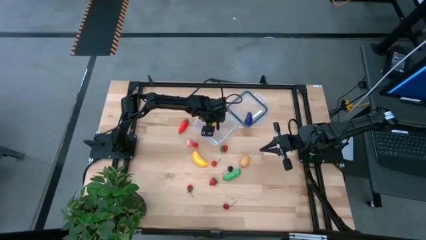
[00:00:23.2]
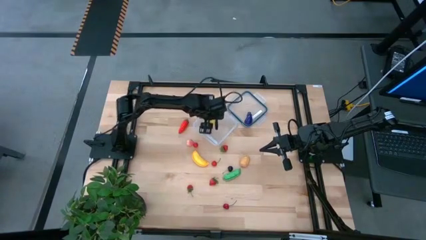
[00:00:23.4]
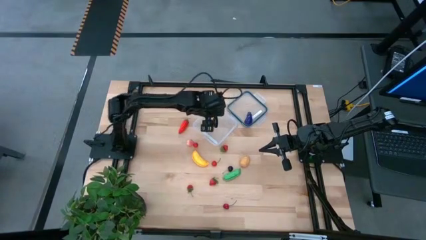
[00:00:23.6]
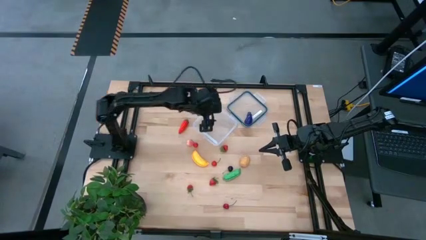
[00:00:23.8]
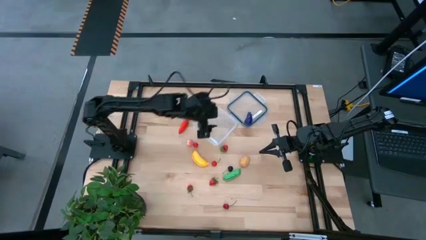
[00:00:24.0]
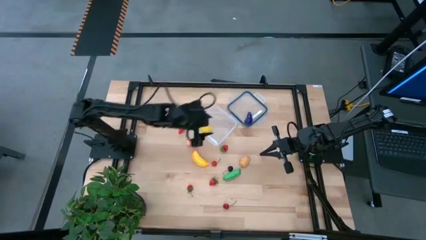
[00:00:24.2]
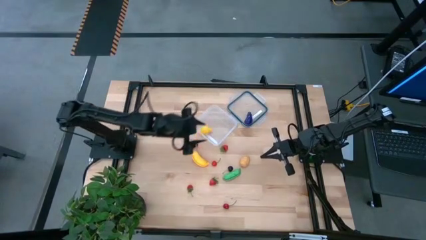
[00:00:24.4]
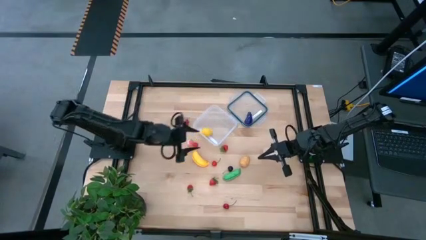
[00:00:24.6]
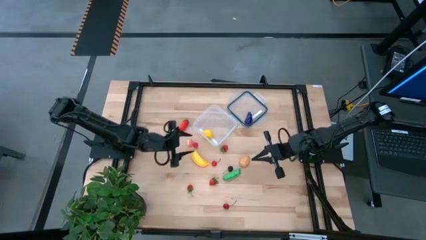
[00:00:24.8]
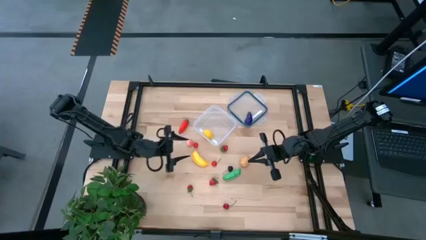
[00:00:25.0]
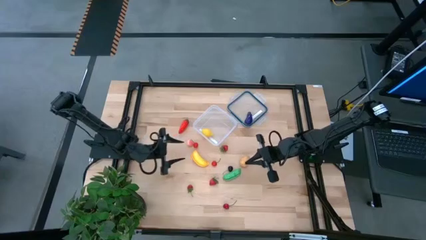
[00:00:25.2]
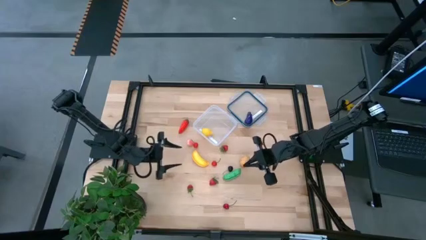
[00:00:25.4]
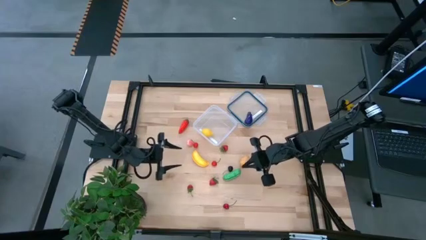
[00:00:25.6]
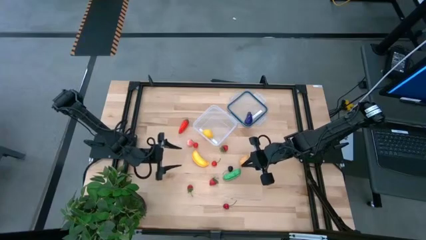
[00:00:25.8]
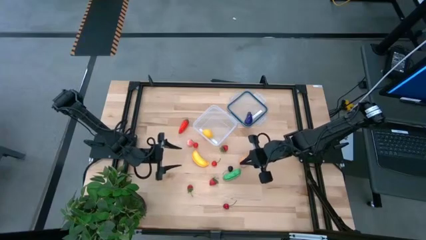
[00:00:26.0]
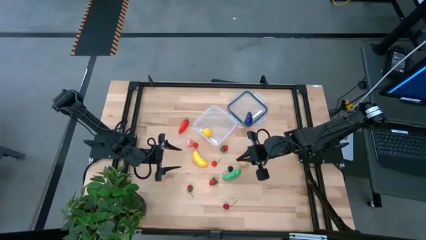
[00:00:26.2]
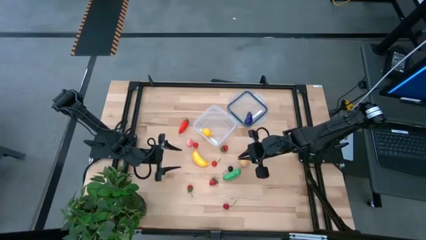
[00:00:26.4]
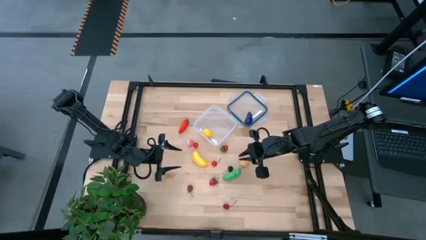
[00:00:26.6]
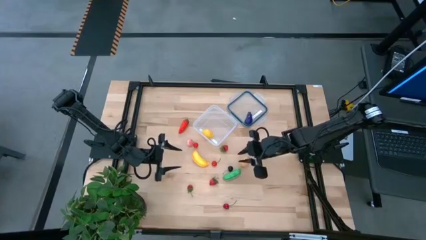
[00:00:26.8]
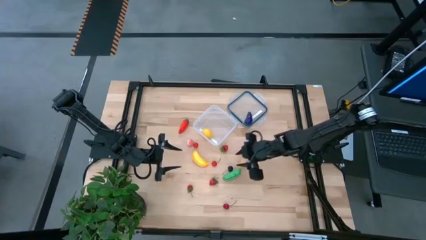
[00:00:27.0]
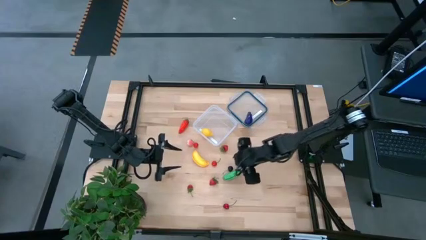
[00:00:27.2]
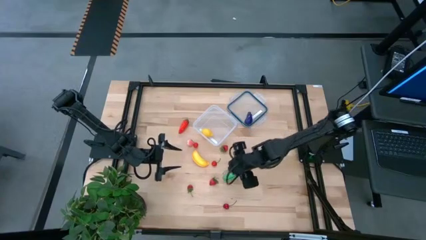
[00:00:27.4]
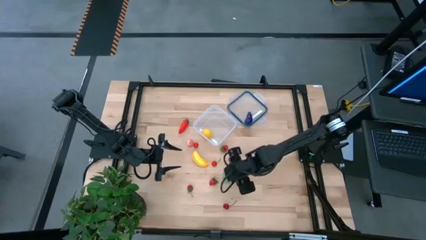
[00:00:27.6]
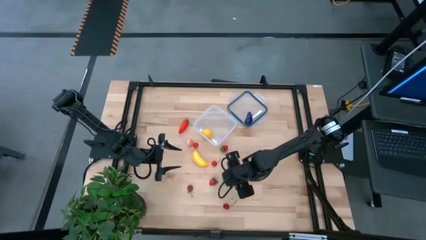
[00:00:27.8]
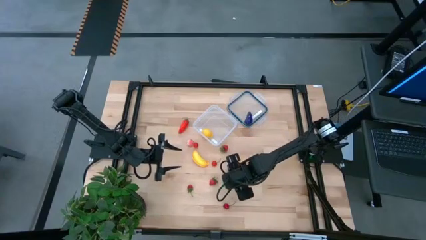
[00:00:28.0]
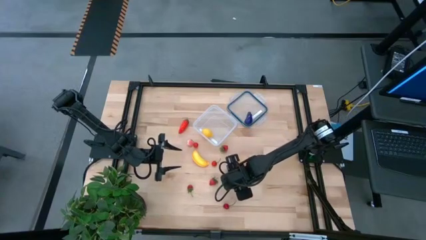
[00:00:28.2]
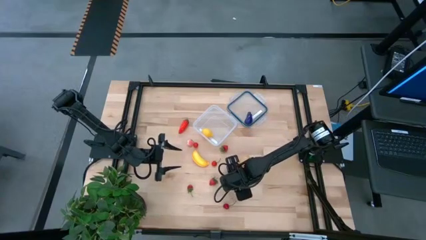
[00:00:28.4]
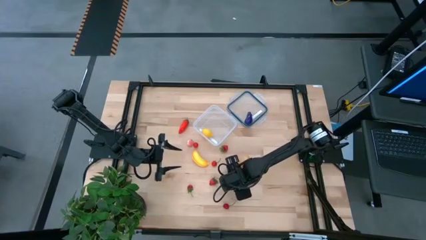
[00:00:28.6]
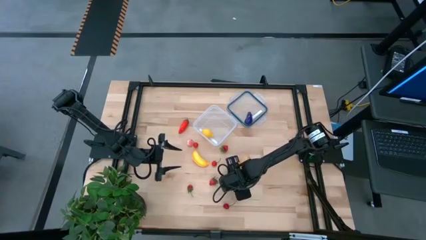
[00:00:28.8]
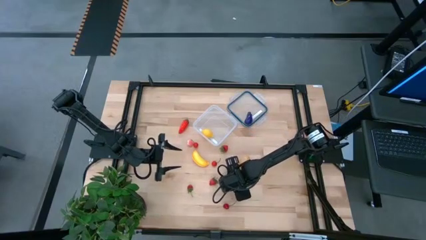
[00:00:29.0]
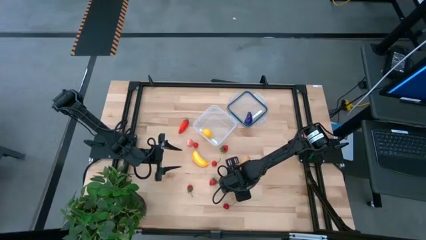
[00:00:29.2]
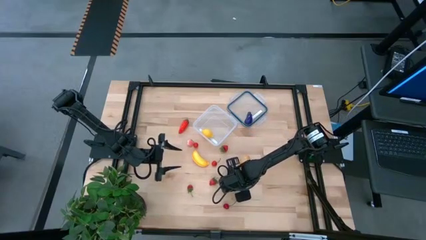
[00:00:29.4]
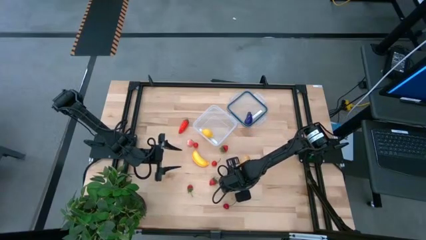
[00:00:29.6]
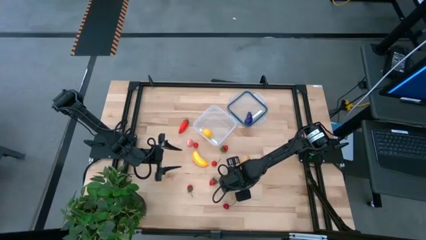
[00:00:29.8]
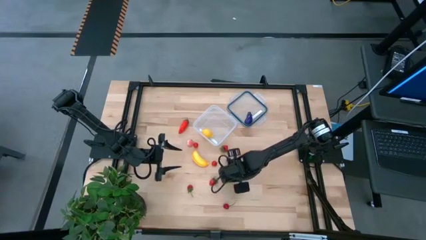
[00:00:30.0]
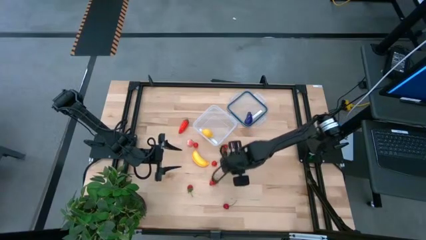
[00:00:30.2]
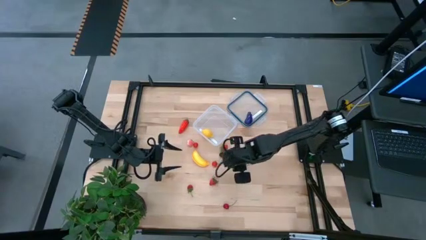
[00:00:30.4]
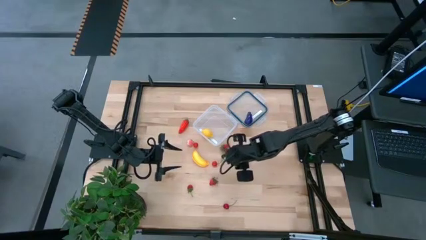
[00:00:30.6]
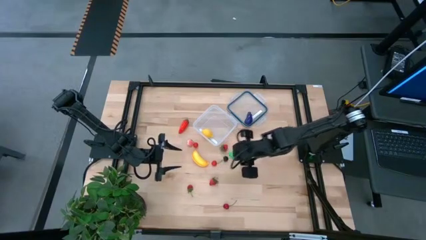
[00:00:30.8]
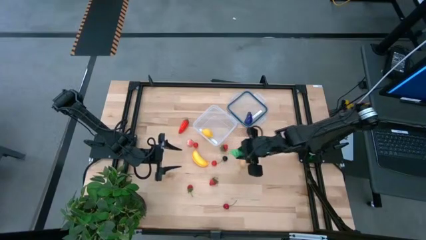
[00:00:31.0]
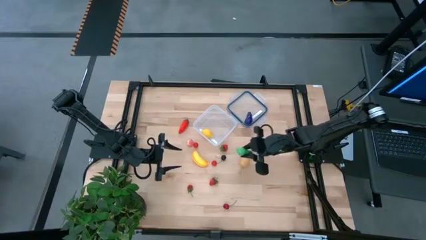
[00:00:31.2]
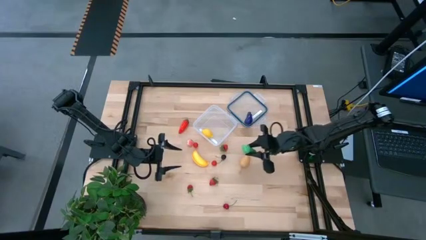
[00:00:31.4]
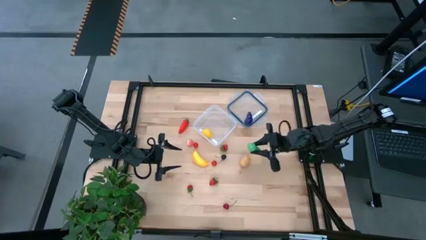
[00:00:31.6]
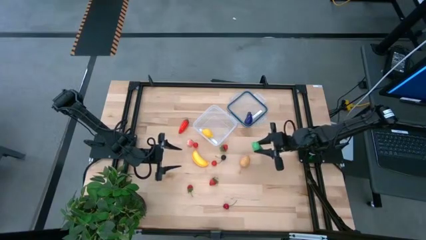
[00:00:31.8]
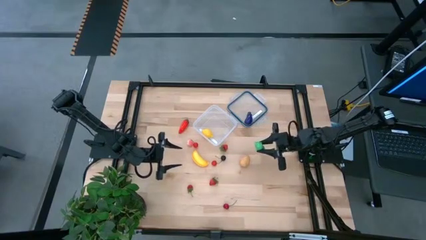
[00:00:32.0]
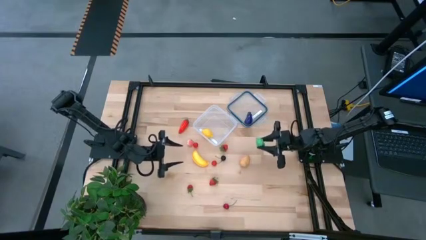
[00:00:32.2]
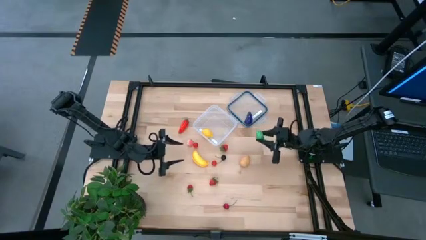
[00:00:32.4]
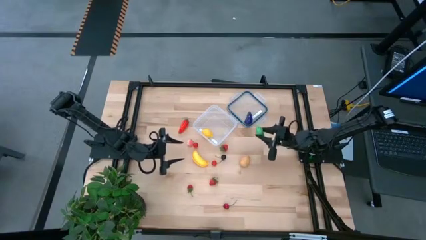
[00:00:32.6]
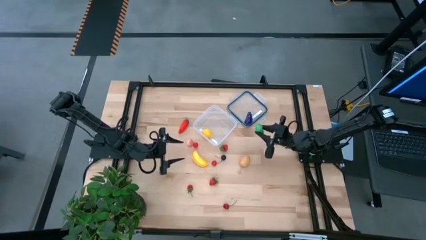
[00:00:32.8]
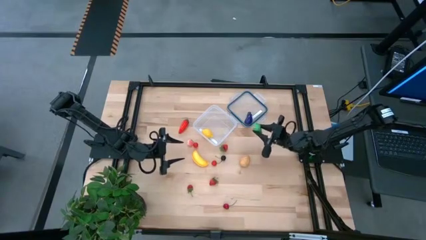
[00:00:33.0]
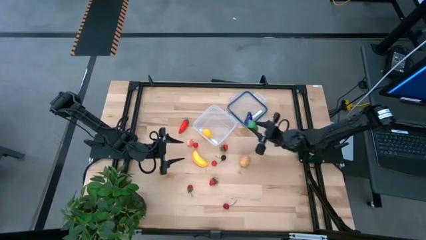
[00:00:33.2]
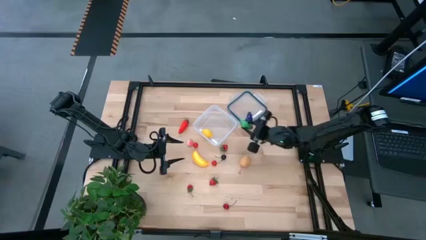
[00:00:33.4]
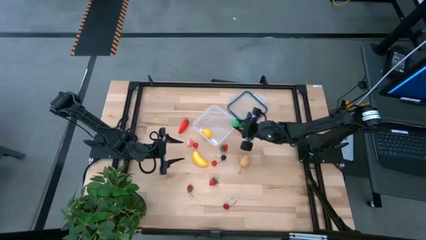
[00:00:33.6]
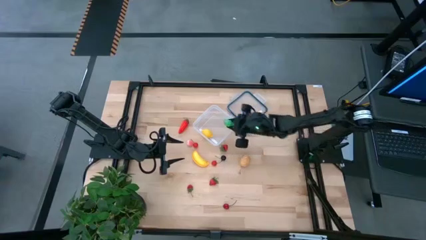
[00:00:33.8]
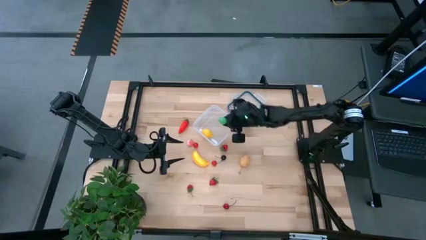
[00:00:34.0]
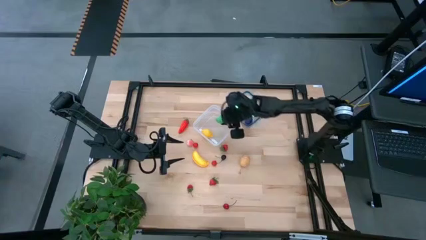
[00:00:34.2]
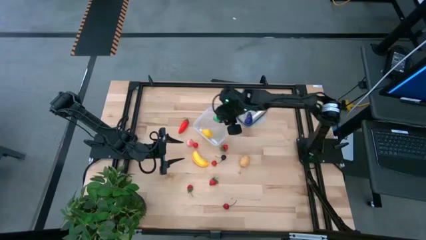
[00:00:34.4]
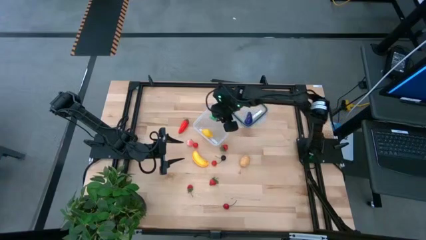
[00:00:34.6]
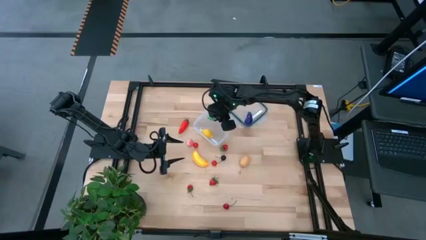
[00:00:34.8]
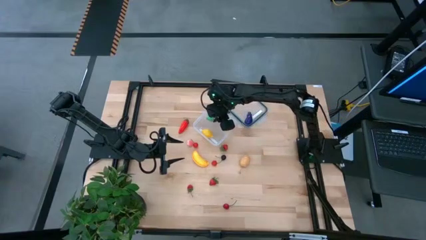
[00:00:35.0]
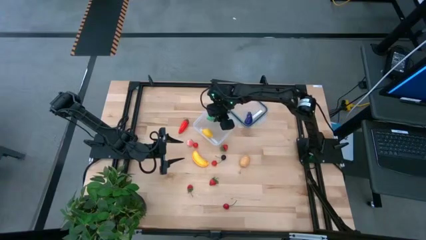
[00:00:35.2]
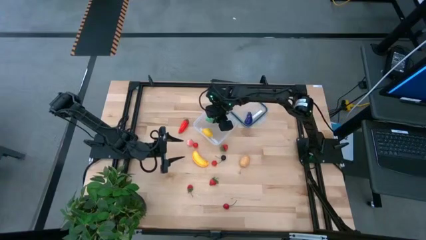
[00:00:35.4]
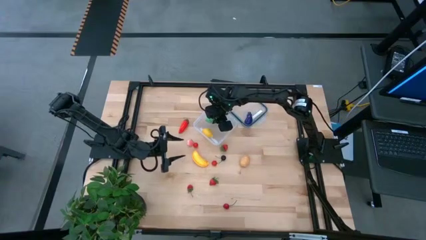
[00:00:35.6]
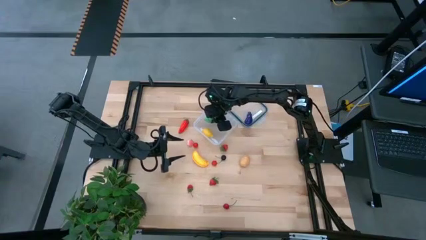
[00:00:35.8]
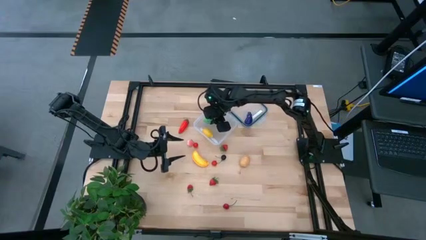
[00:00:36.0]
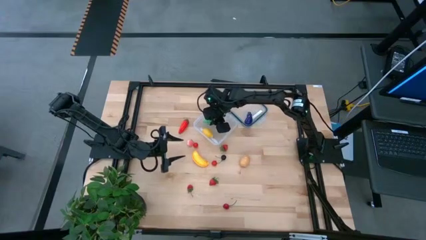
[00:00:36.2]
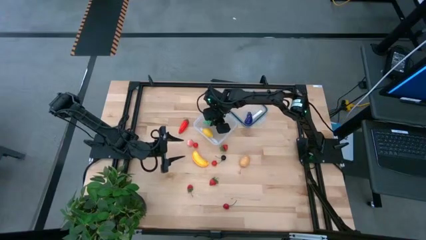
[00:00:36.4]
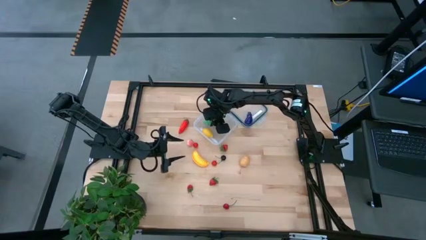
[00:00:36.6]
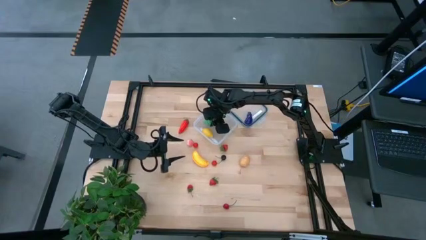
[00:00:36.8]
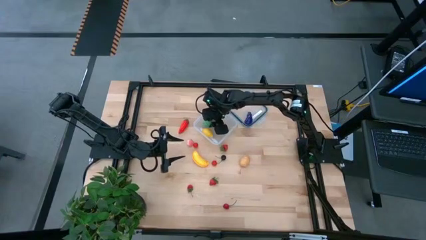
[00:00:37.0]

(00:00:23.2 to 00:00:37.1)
Task: Pick and placing Produce into tupperware
Put the green bean into the transparent container

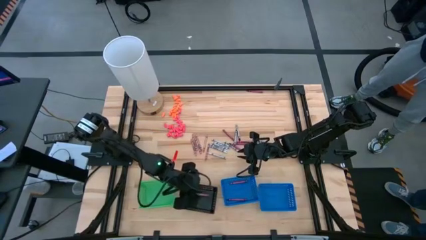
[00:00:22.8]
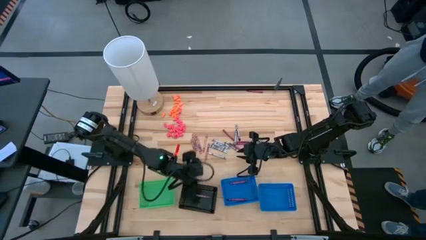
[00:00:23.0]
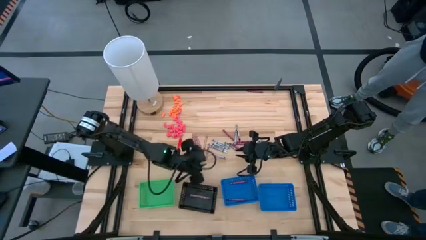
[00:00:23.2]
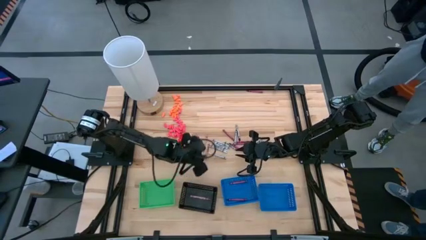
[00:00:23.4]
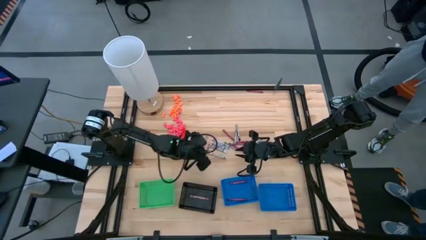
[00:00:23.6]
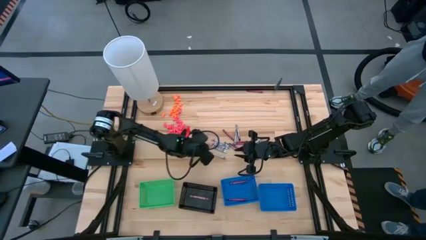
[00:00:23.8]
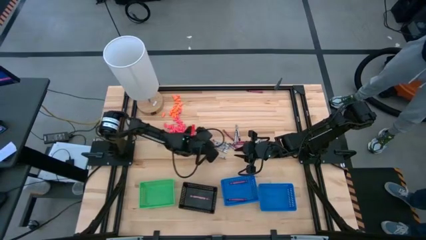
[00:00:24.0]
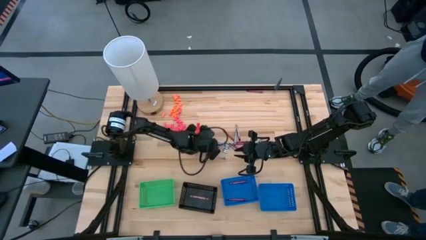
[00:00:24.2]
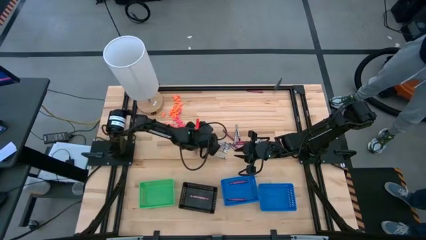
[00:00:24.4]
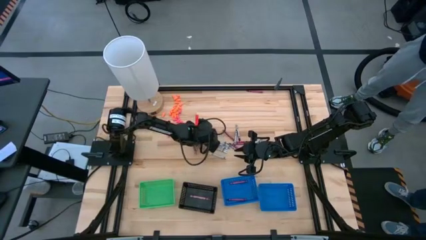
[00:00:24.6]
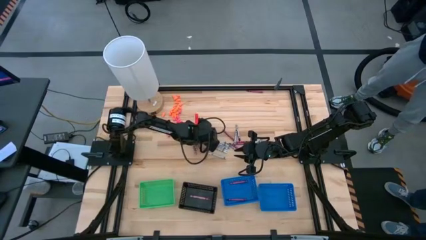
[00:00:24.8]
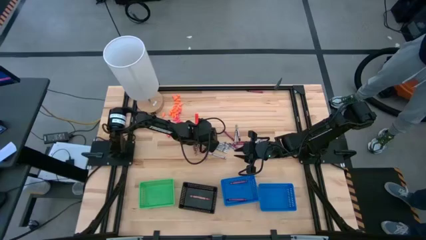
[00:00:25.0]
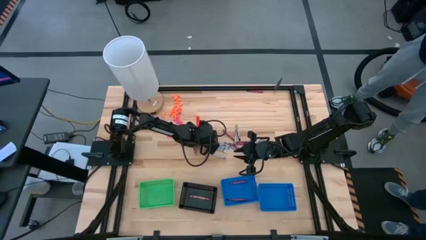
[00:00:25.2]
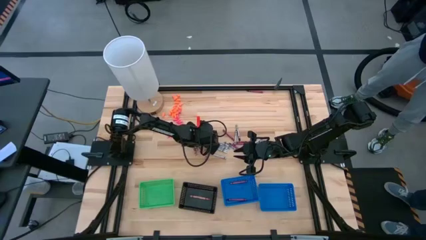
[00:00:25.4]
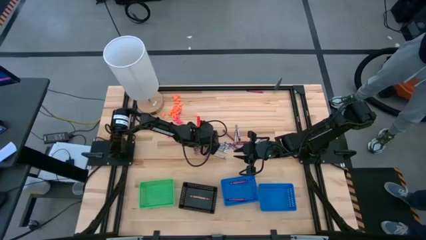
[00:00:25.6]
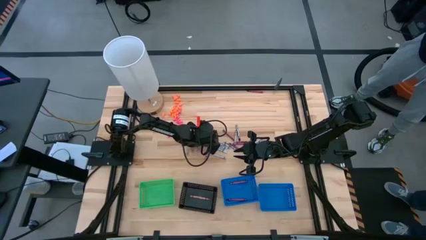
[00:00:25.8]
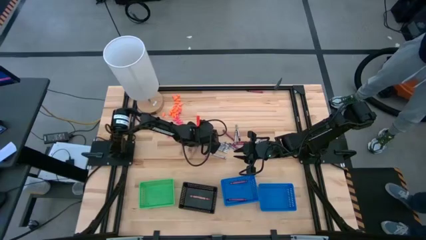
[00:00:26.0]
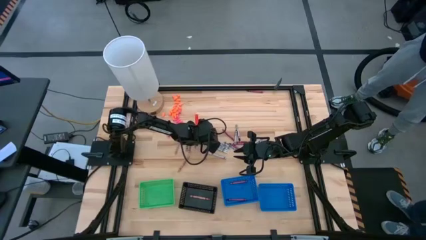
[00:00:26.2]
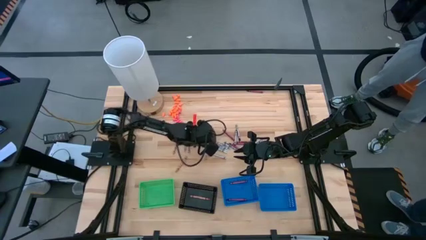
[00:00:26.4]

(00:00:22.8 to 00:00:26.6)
Task: Sort crayons
Put the pink crayon into the black bin
